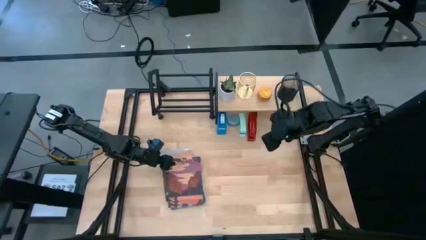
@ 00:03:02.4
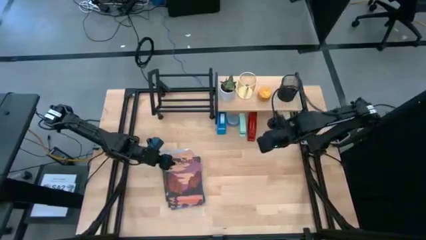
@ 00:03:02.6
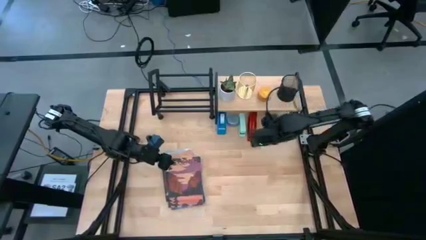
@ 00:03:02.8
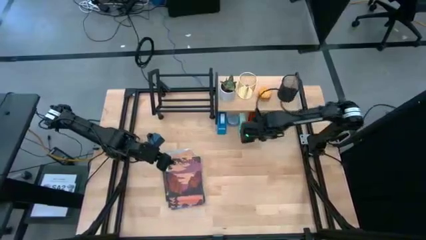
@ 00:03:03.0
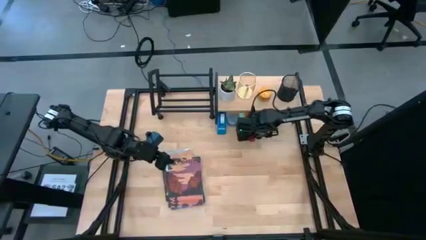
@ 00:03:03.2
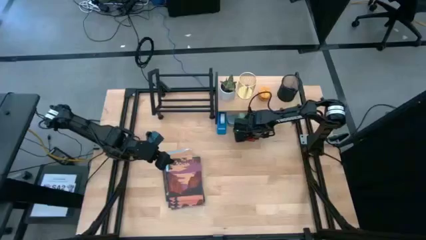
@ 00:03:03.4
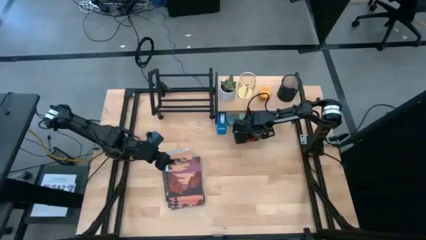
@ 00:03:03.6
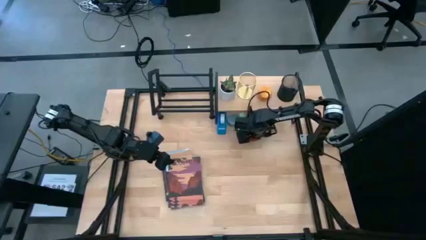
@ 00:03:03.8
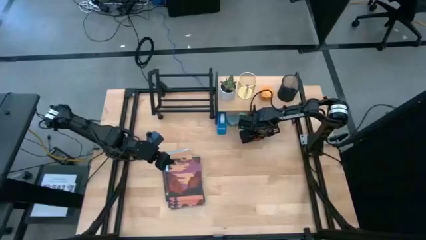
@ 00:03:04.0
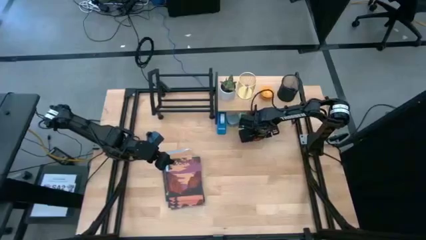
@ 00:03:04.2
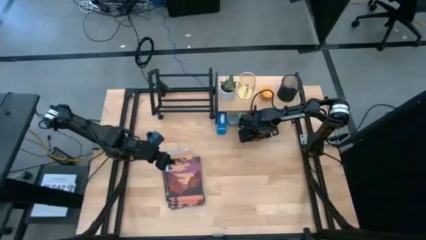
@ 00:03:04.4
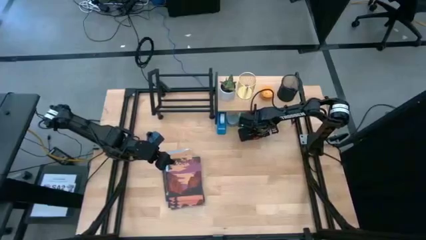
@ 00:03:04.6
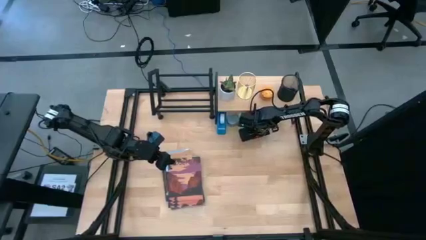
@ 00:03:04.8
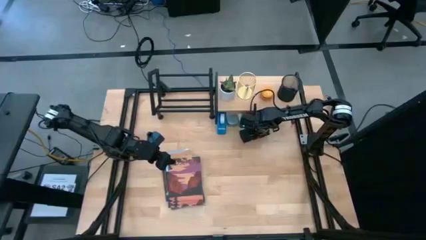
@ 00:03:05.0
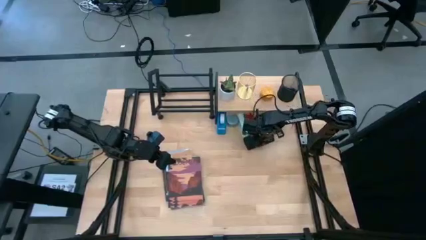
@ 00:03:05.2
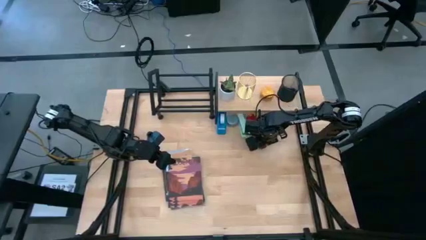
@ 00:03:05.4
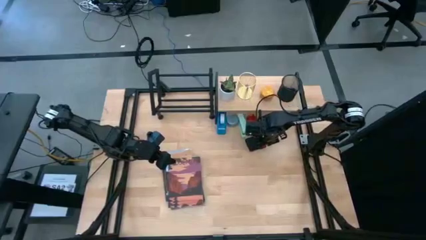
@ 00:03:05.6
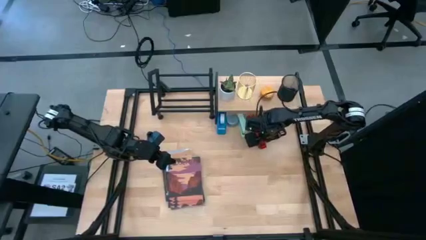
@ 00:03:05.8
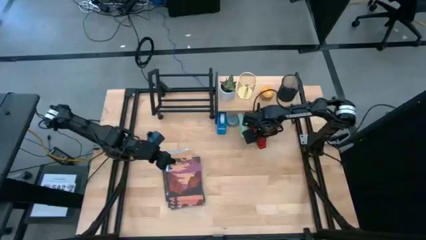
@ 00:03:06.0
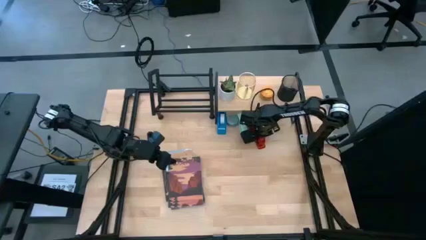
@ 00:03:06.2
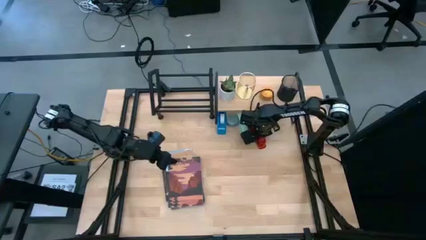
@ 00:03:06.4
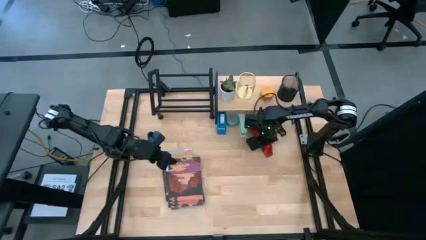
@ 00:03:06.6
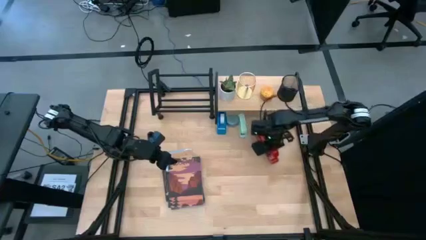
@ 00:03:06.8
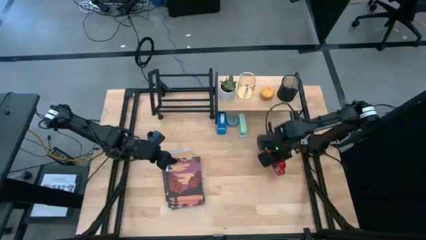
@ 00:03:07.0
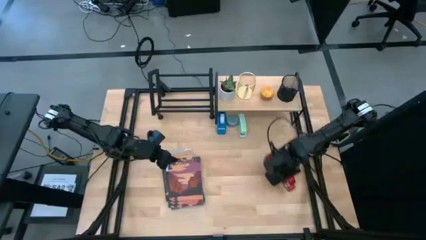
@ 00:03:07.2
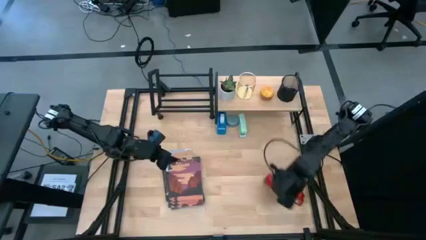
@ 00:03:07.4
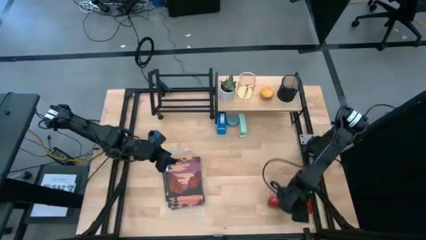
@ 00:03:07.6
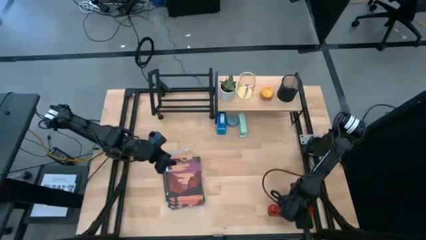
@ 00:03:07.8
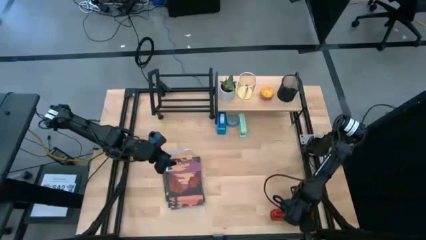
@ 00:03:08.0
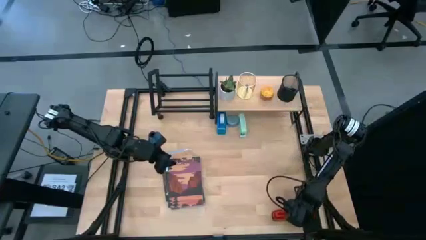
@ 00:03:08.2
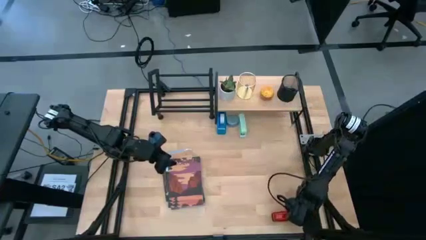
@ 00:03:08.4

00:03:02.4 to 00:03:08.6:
Task: Stock shelves
Remove the red stapler from under the shelf

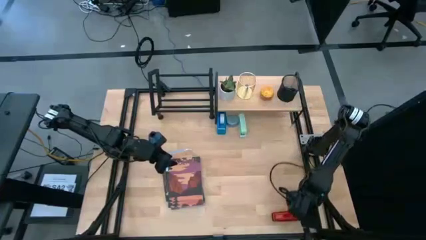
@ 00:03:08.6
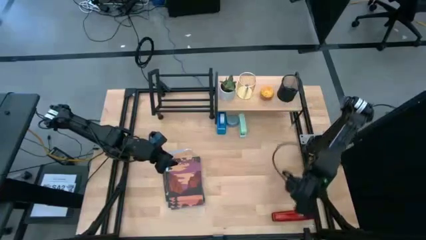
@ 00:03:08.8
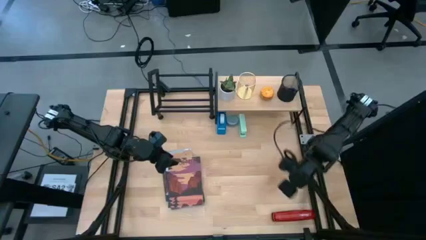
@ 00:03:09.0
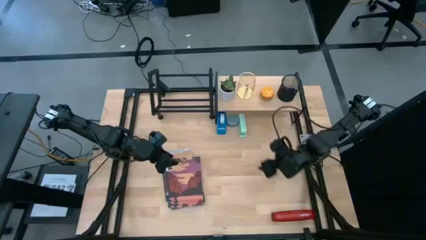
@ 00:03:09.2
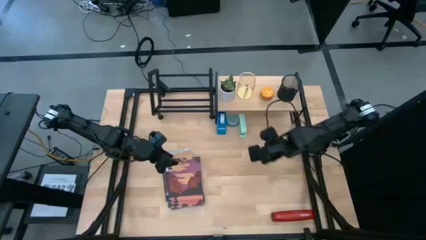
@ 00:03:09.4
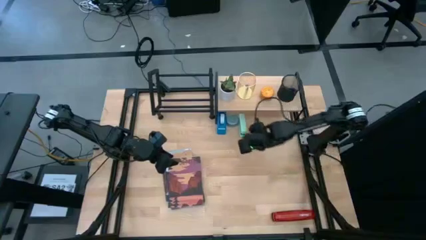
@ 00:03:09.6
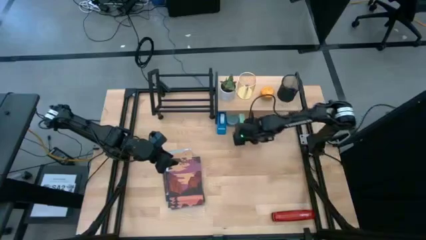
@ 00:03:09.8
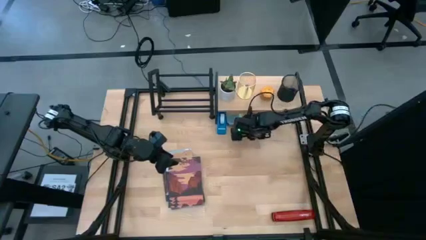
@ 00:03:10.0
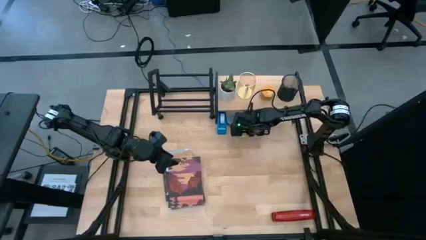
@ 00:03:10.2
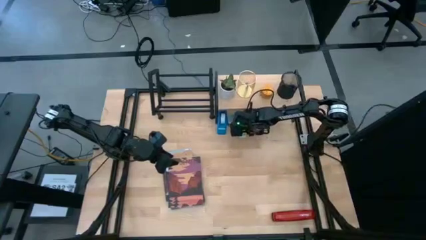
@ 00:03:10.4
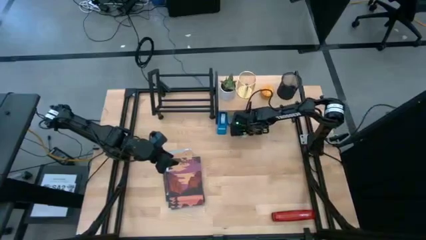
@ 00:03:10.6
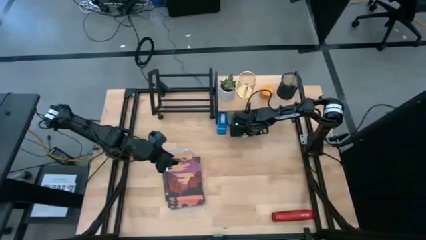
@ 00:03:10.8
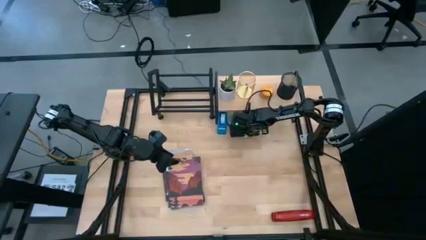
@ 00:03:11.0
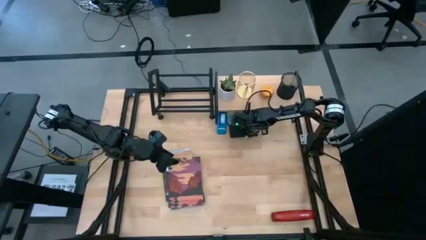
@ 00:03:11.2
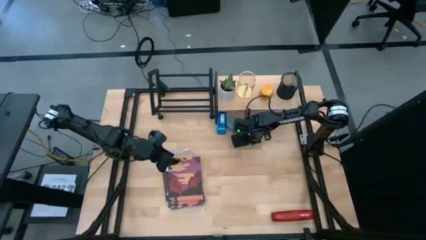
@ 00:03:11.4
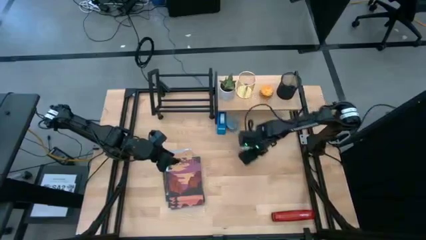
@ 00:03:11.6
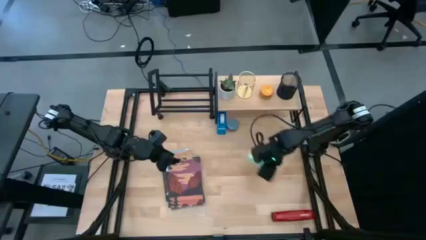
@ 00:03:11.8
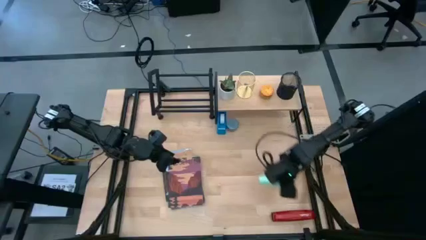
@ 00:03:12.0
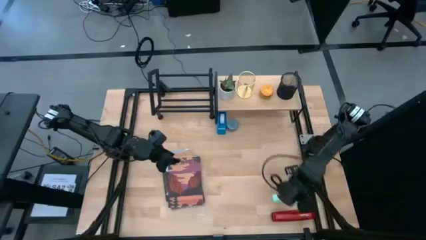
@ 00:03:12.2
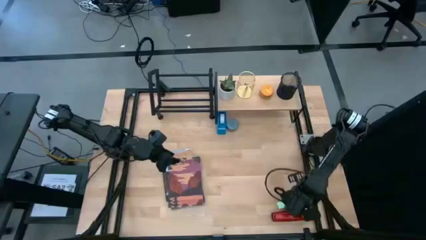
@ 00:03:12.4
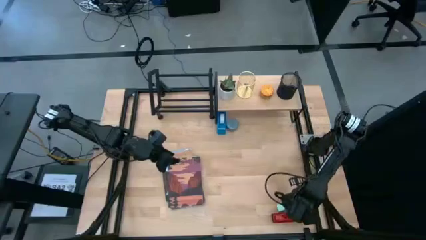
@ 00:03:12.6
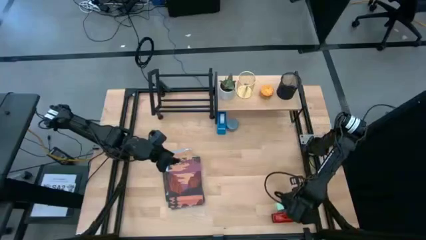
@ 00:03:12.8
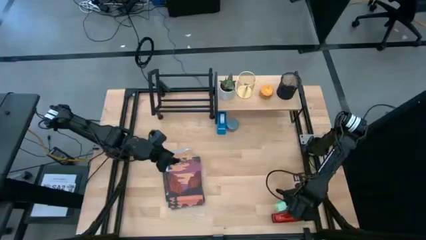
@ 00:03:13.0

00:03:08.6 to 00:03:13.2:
Remove the green stapler from under the shelf

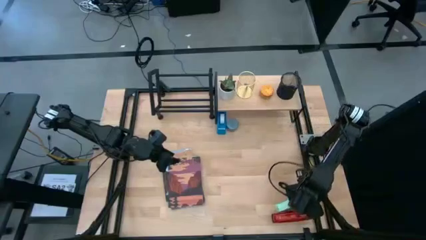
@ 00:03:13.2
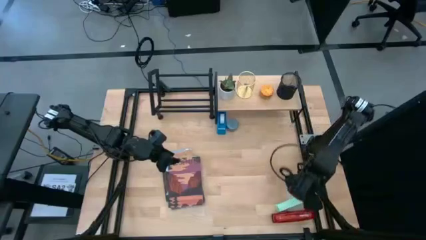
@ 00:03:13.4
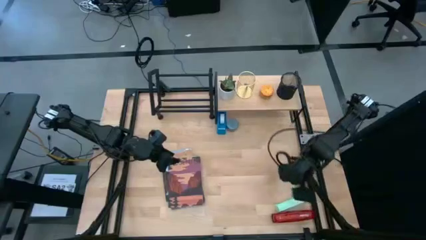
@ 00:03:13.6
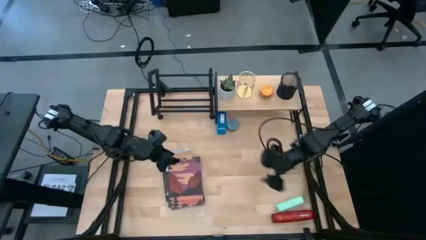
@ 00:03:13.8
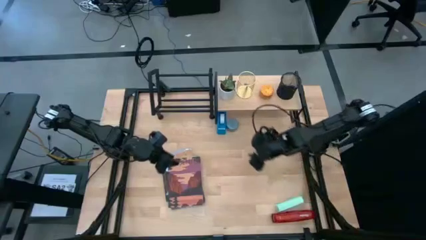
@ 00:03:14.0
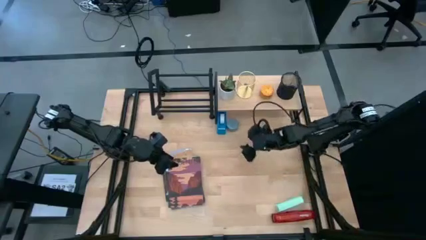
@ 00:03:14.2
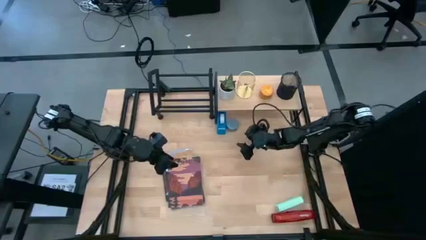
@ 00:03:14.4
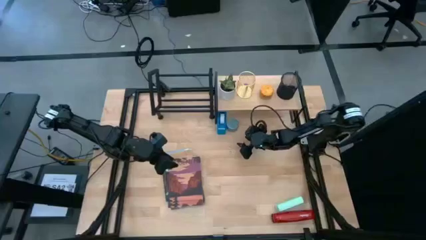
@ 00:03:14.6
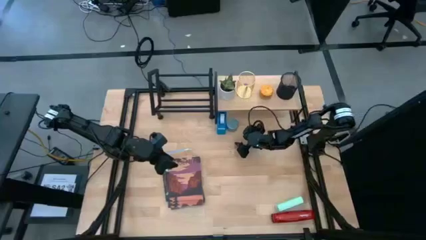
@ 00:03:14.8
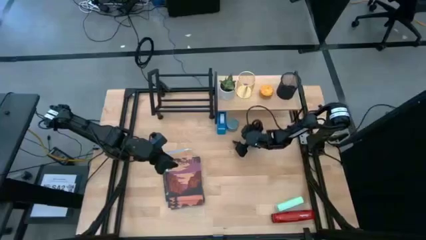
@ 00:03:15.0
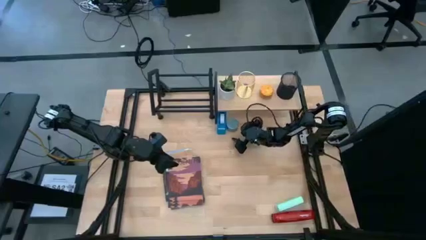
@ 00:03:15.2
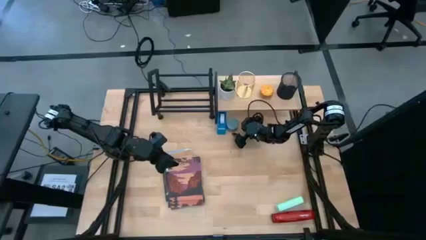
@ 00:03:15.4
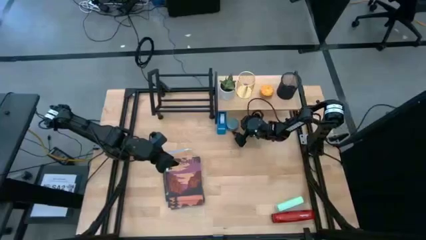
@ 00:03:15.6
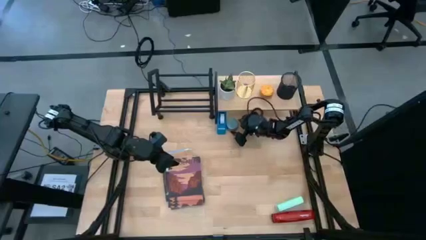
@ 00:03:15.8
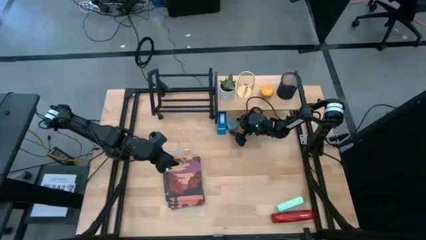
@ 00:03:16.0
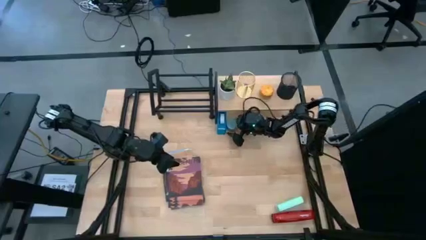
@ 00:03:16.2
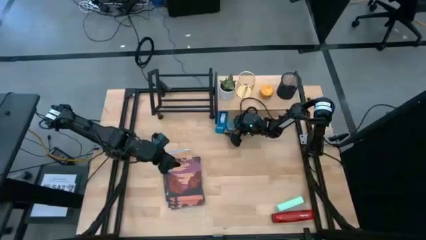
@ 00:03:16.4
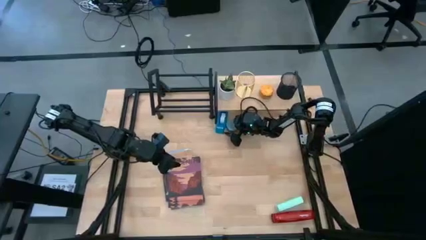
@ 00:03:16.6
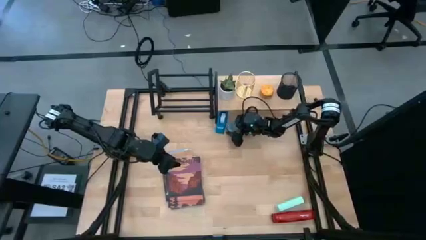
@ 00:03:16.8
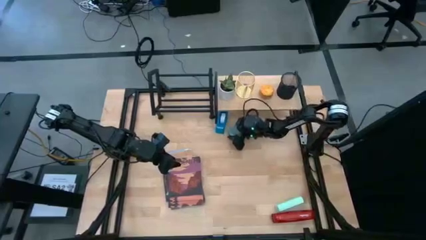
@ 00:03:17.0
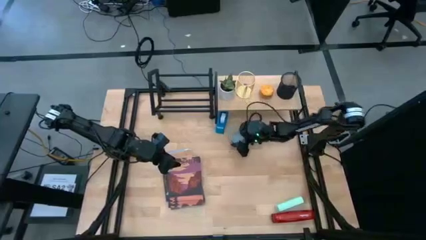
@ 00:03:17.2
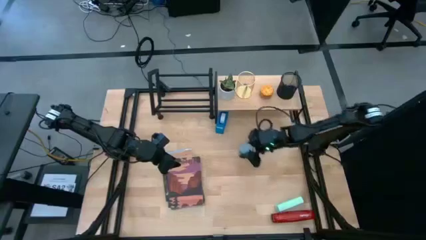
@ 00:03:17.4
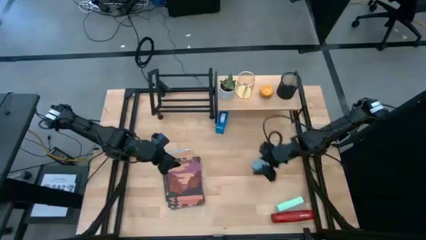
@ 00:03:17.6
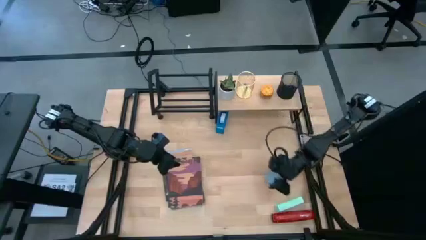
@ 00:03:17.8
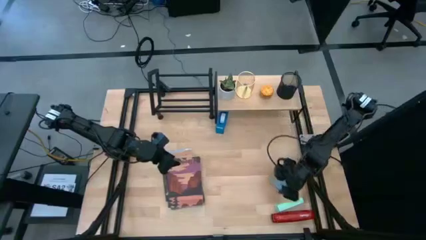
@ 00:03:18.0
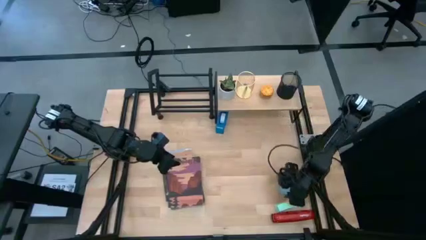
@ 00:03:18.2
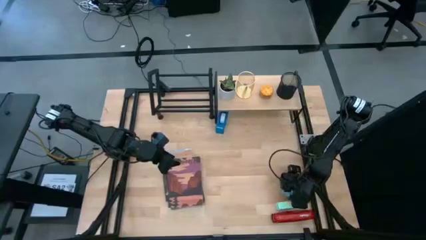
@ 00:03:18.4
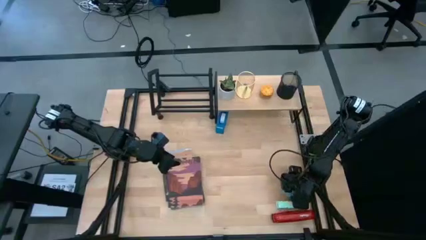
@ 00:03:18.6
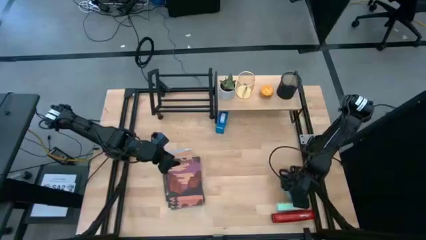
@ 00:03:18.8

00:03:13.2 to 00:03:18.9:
Remove the green scented candle from under the shelf
